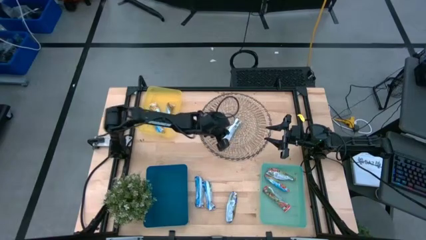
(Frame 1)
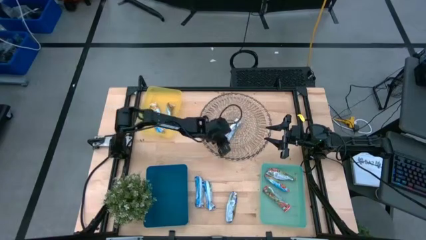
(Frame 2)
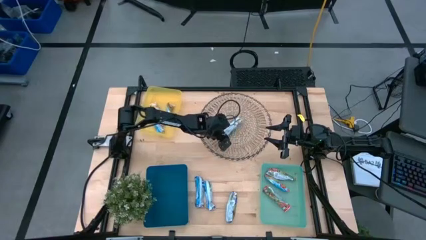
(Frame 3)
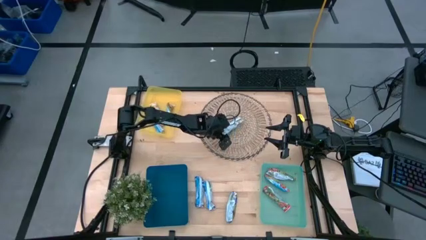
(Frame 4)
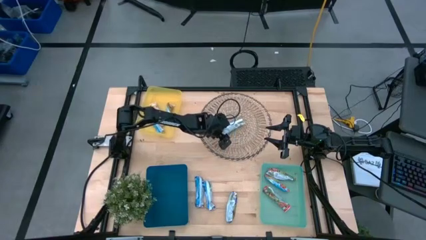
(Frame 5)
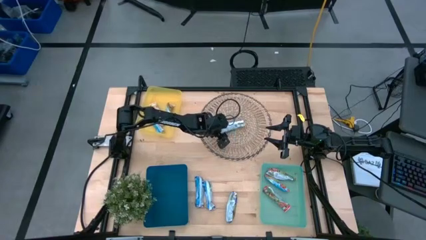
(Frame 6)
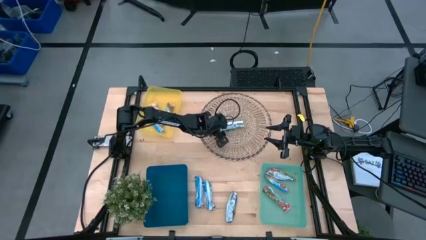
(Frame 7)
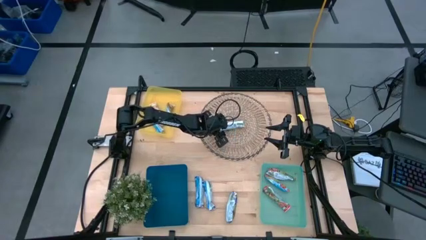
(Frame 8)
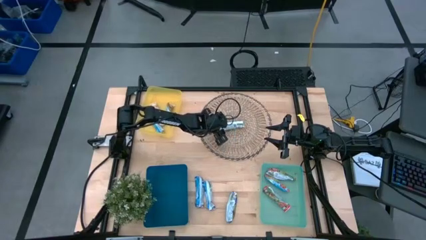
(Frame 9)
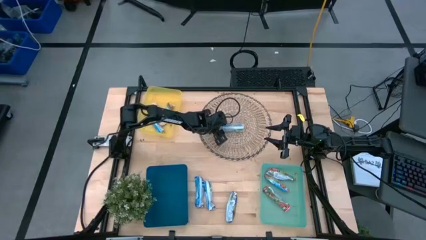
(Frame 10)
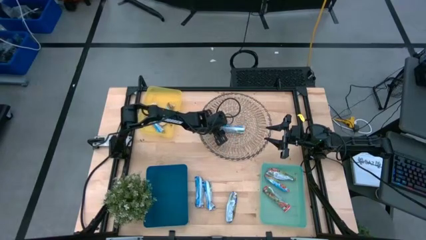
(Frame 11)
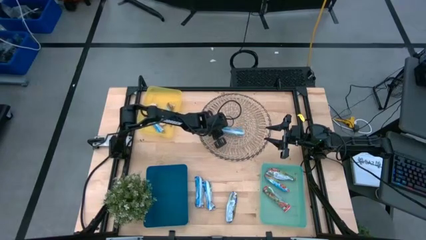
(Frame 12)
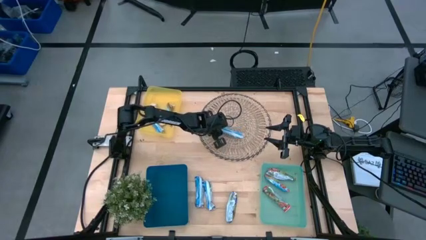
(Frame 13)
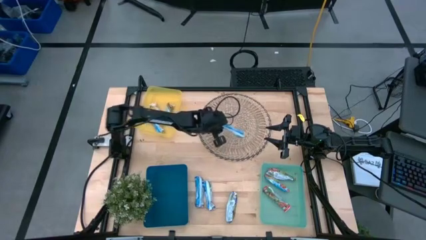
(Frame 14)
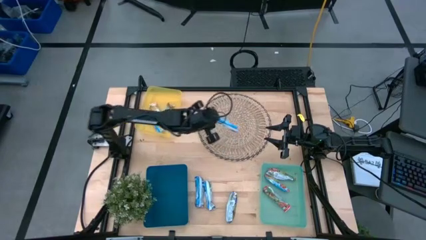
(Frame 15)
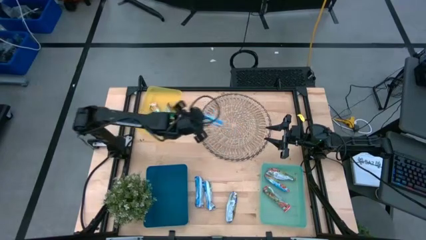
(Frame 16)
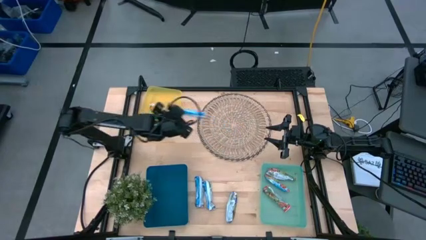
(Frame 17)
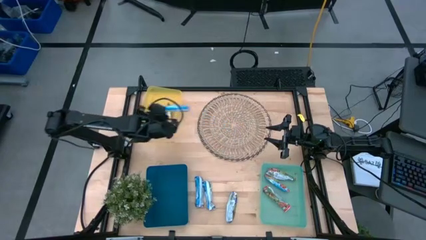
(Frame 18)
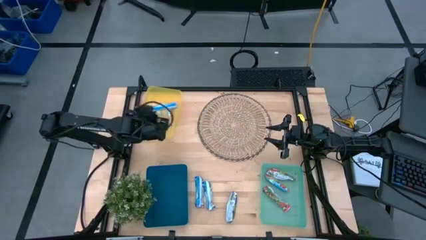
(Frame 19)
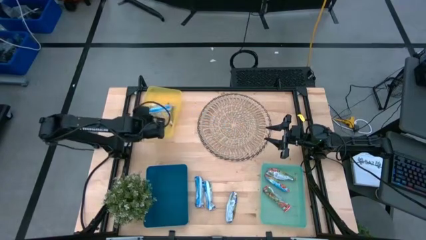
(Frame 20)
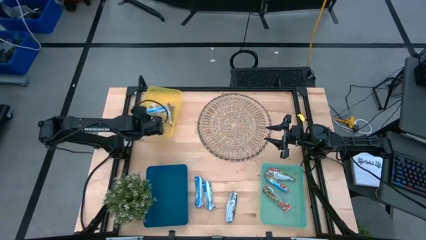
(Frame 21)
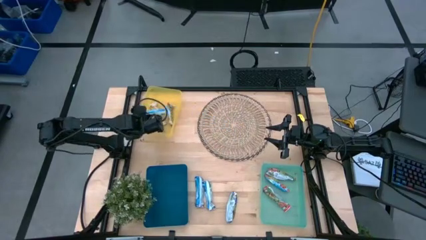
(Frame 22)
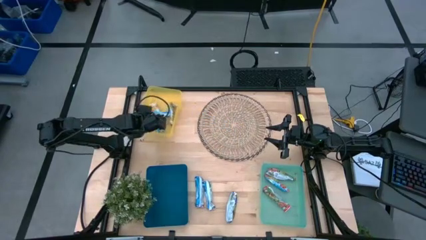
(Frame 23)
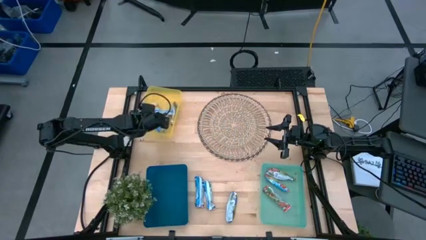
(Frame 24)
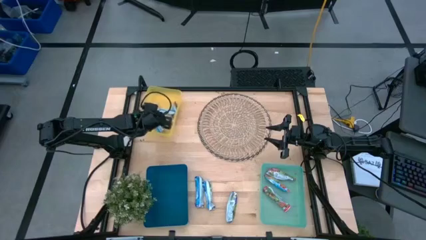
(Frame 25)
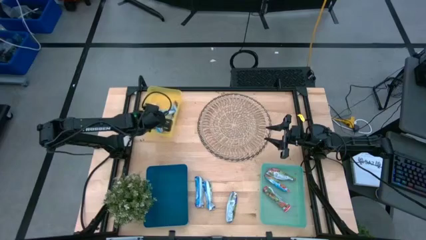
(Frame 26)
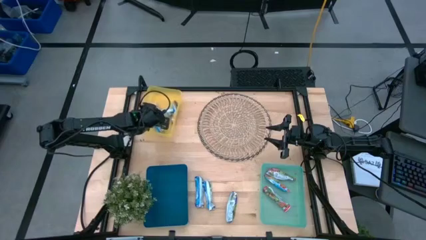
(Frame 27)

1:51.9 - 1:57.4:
Task: Pick and place Granola Bars by type
Put the yellow granola bar into the yellow bin

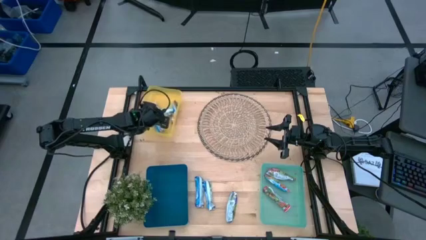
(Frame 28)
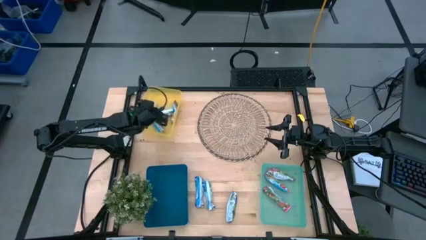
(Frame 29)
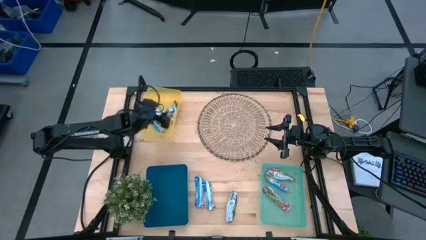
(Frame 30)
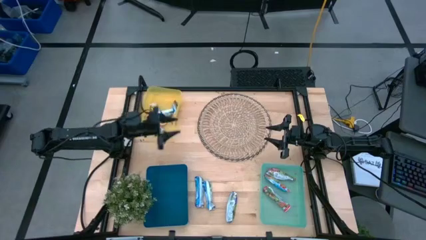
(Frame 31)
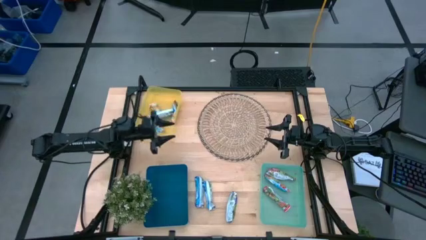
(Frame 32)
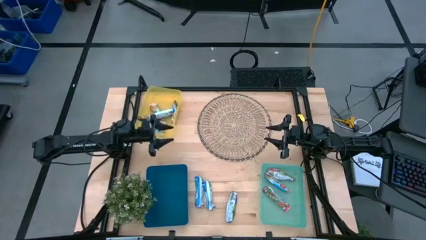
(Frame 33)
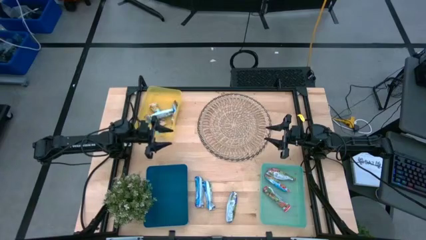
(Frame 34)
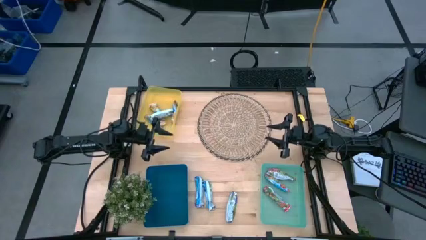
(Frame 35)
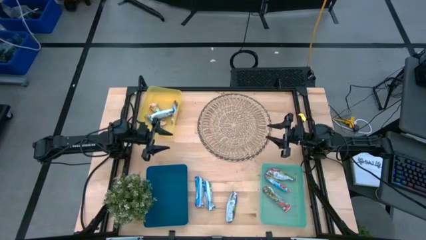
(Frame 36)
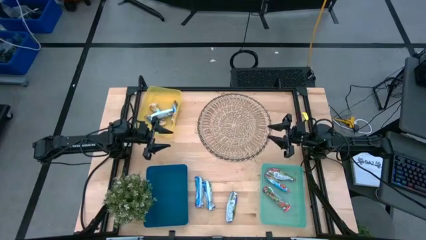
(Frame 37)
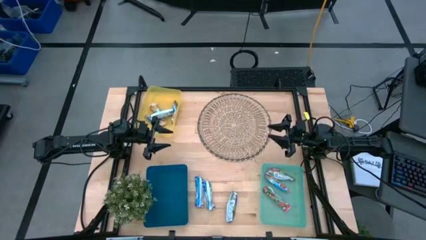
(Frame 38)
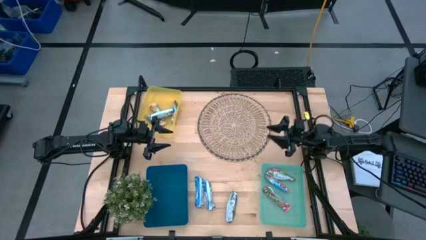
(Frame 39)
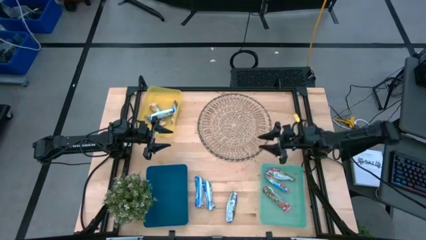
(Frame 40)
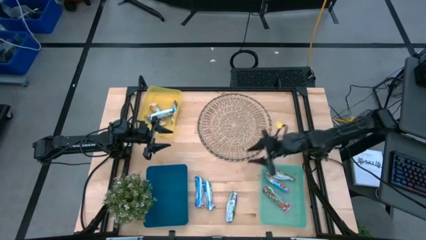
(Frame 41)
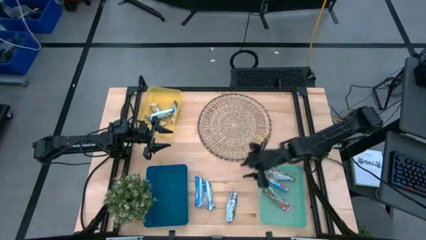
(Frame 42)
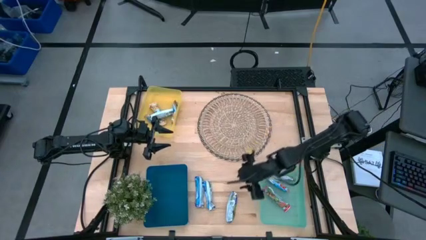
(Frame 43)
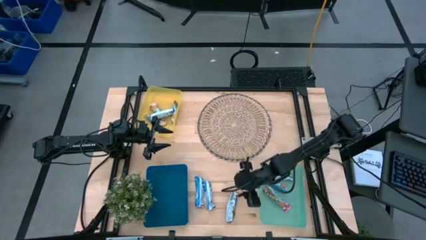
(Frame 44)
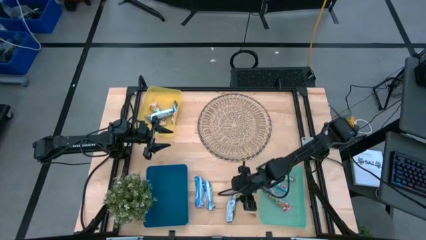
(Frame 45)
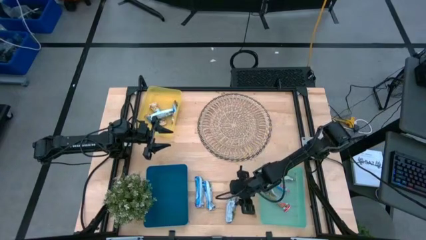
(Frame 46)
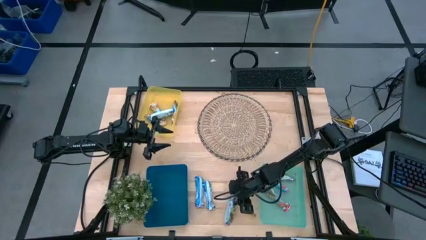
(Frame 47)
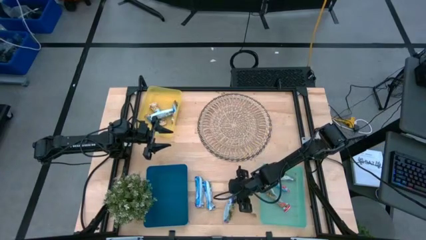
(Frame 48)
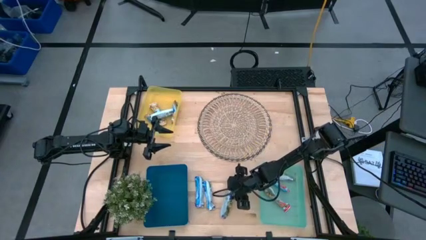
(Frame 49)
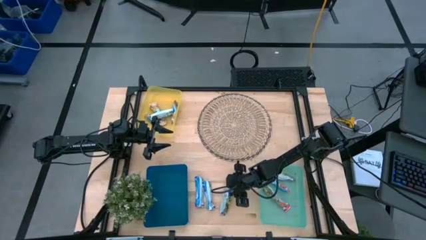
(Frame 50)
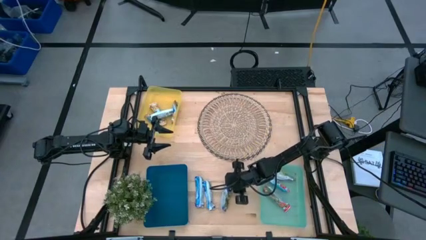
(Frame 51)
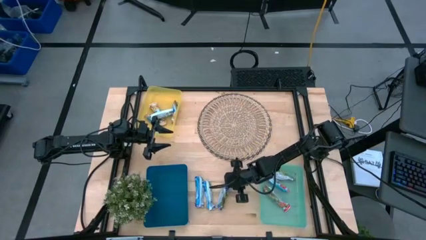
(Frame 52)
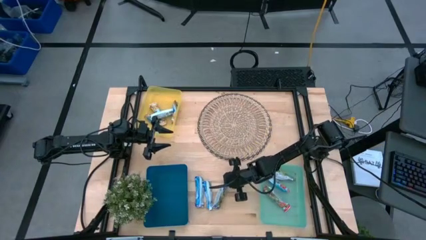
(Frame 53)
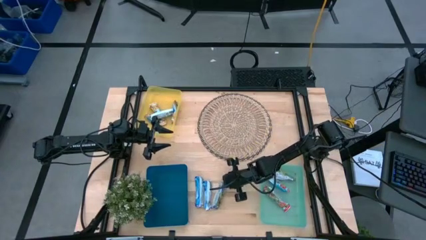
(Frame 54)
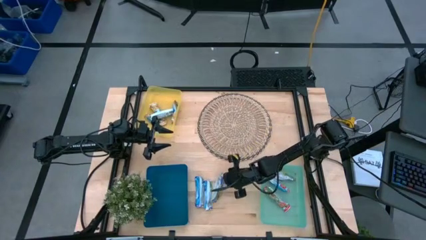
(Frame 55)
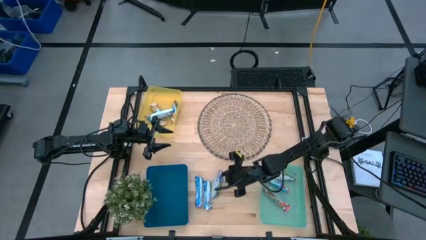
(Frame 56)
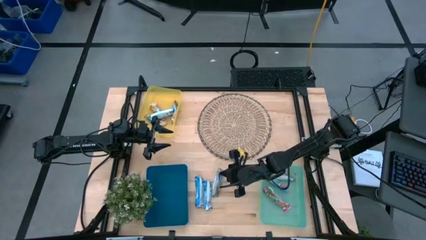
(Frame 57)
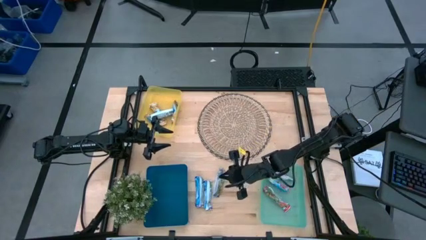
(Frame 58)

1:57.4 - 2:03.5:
Put the blue granola bar into the blue bin

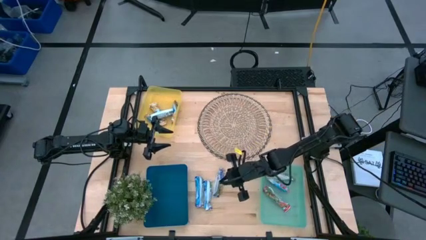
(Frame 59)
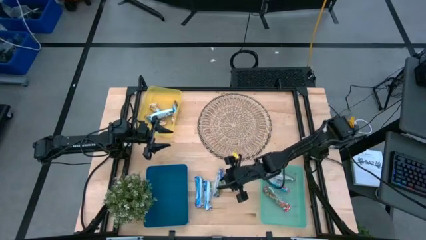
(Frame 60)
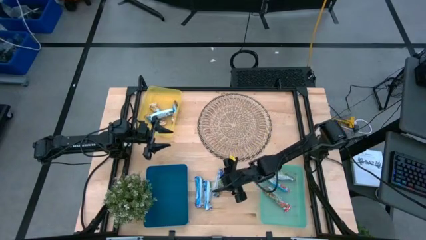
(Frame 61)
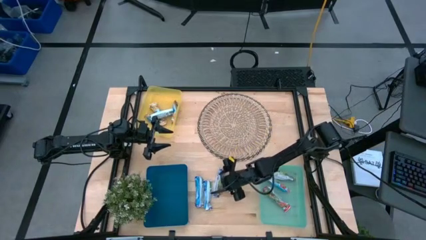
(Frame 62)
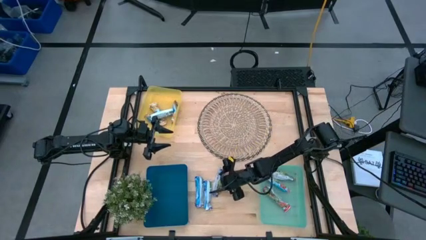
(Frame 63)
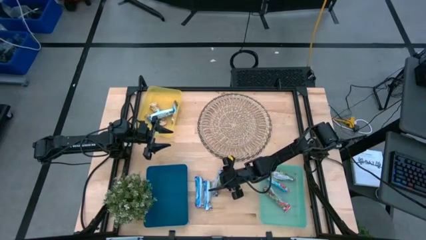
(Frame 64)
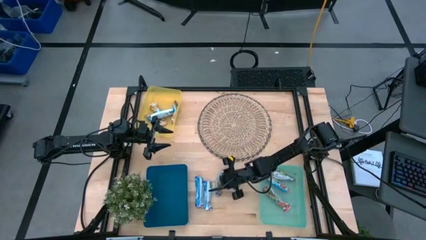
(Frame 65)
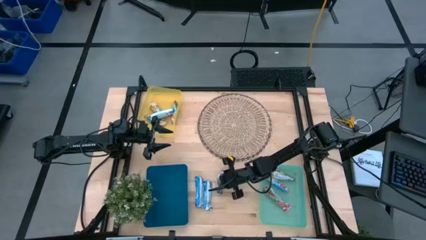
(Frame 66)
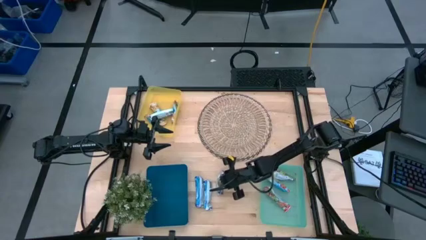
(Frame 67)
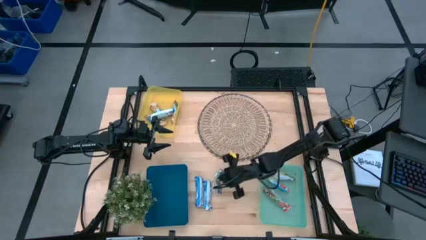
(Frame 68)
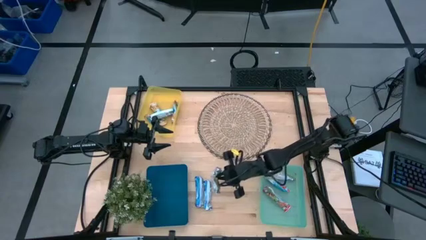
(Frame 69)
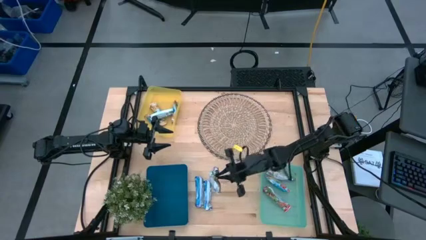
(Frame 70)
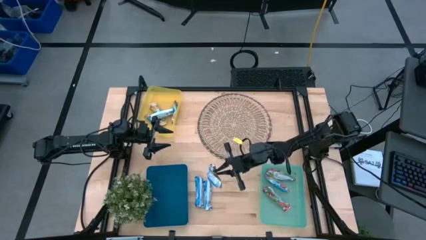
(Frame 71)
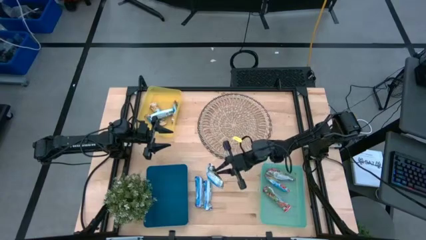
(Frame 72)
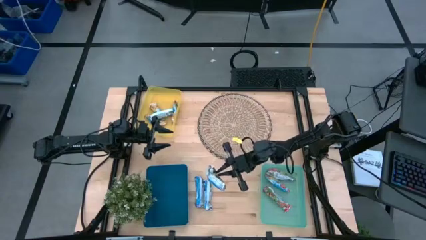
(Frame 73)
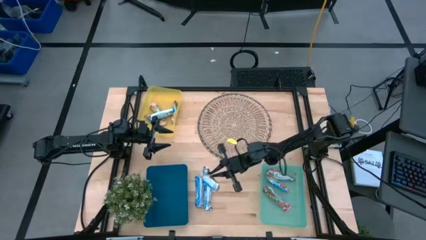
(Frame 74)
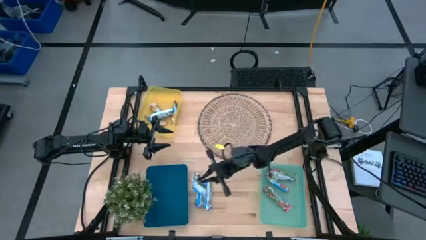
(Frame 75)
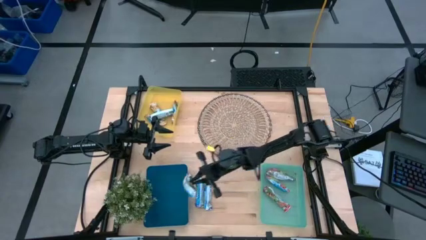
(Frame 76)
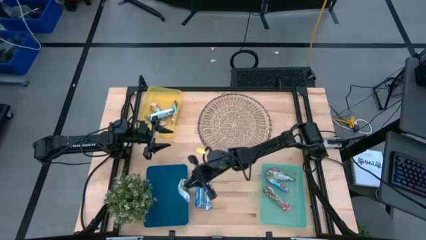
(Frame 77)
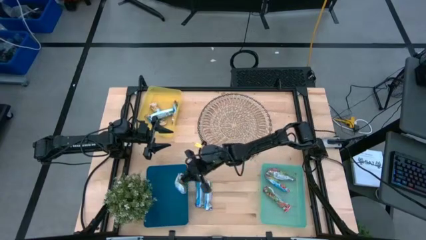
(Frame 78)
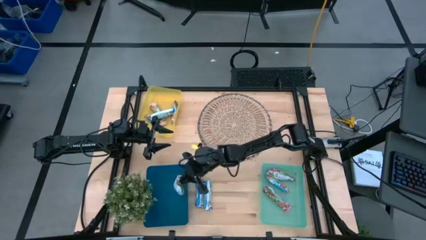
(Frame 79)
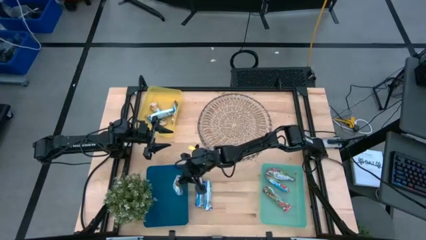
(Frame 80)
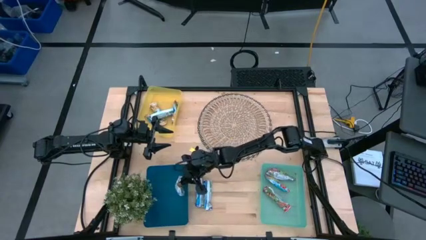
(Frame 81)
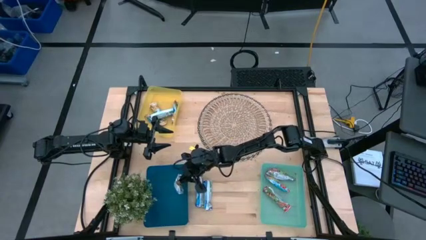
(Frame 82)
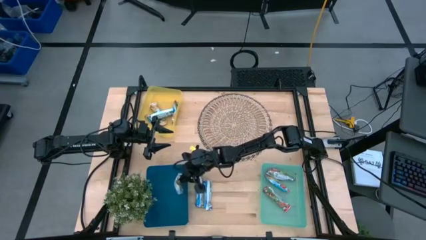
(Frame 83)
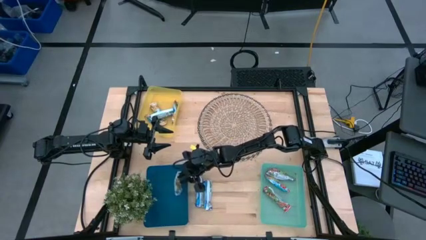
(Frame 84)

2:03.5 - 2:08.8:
Put the blue granola bar into the blue bin
